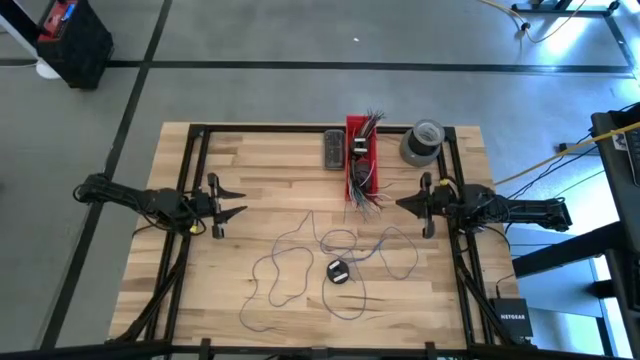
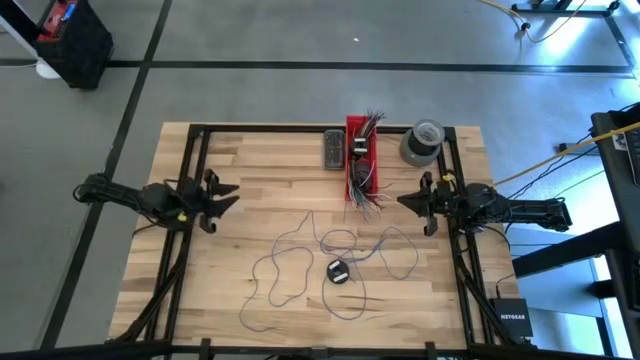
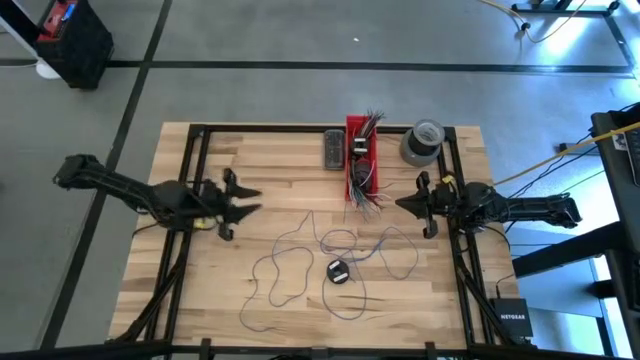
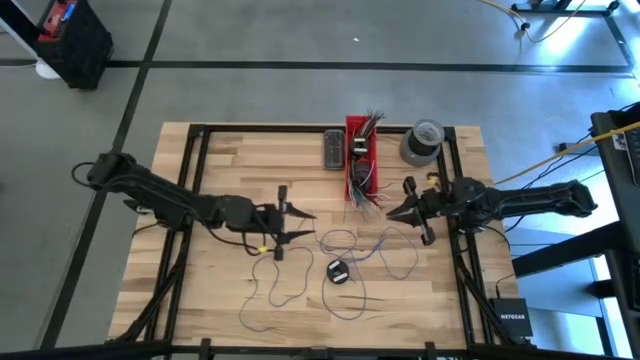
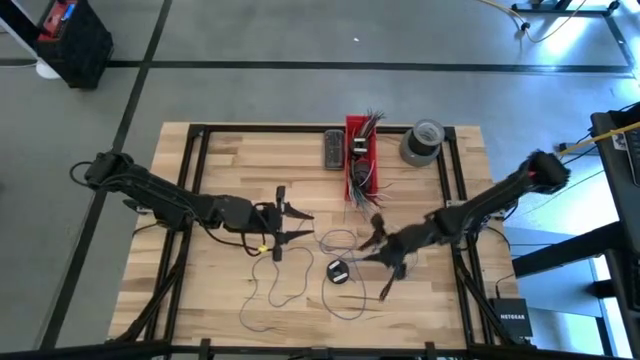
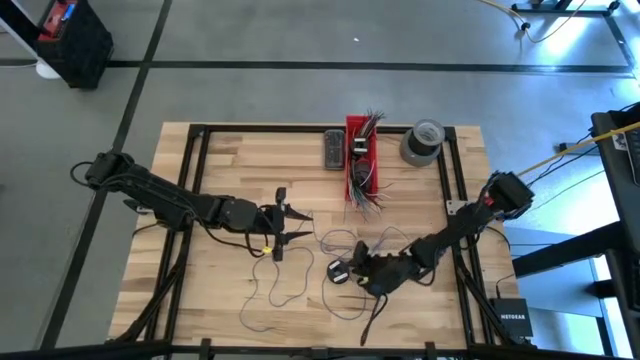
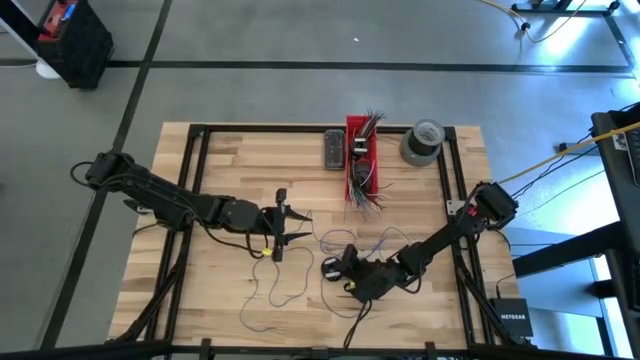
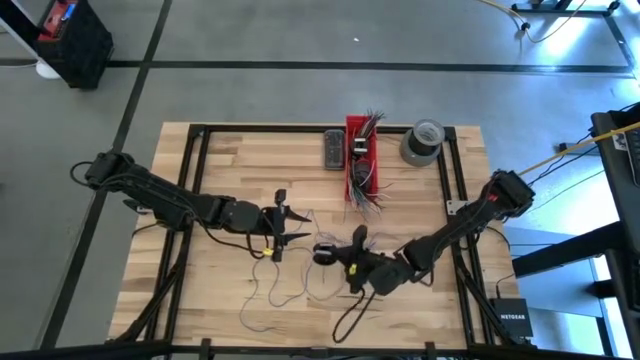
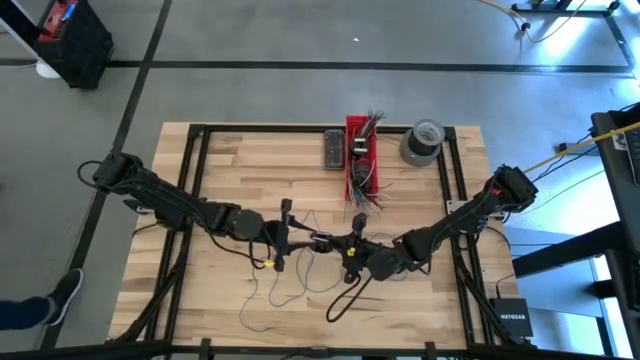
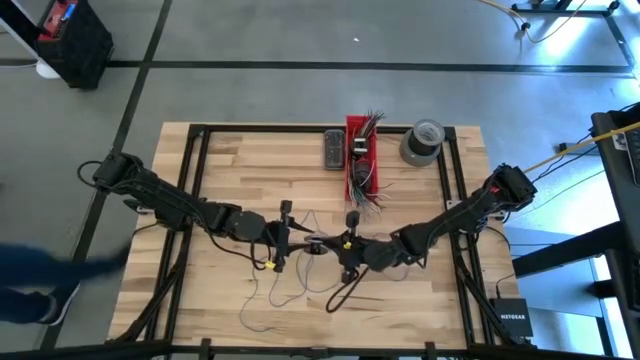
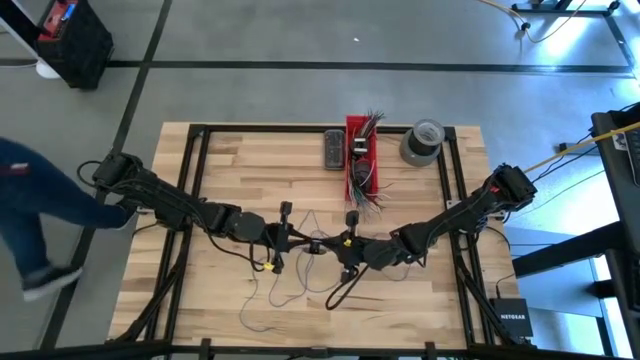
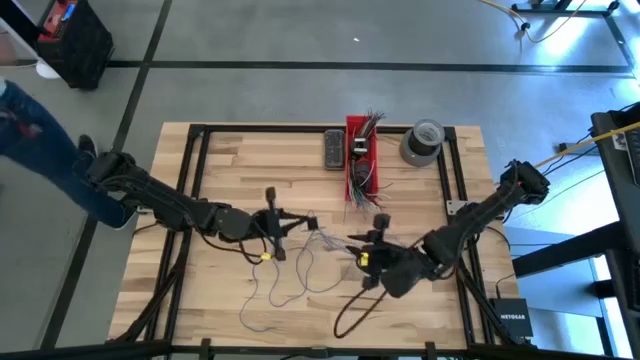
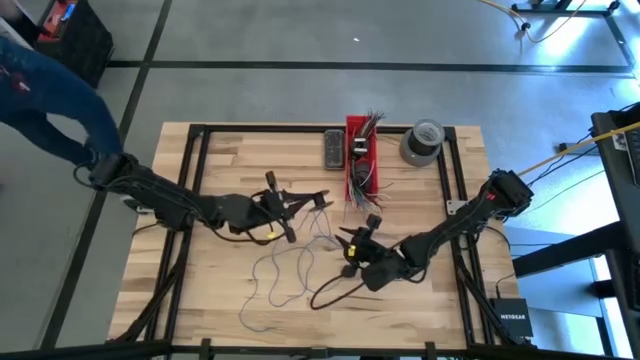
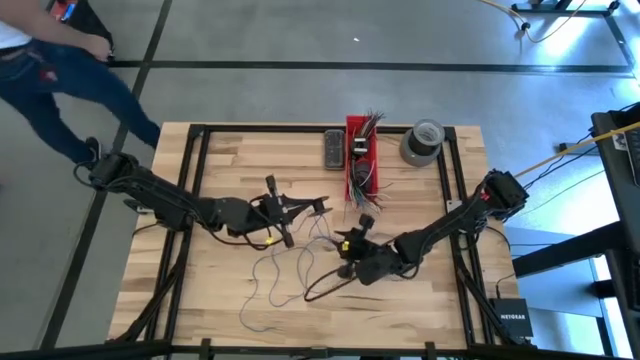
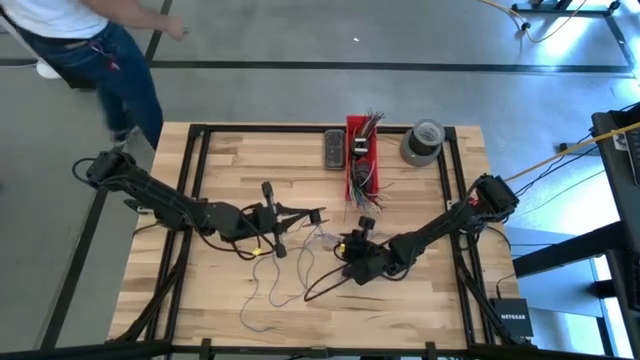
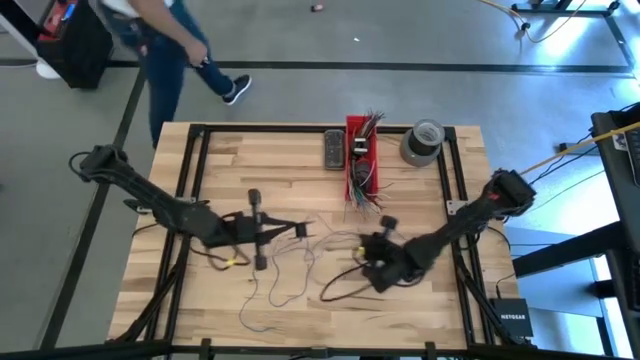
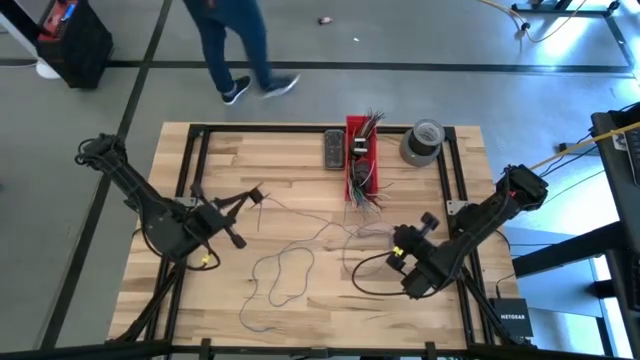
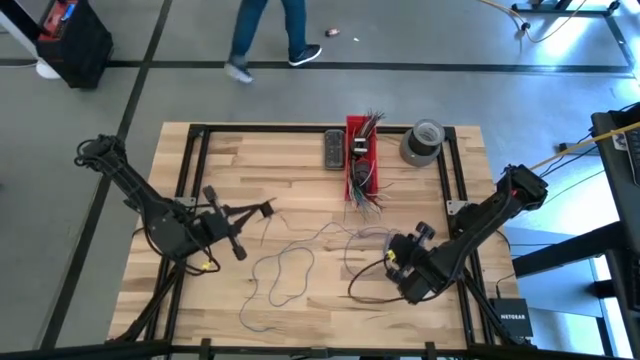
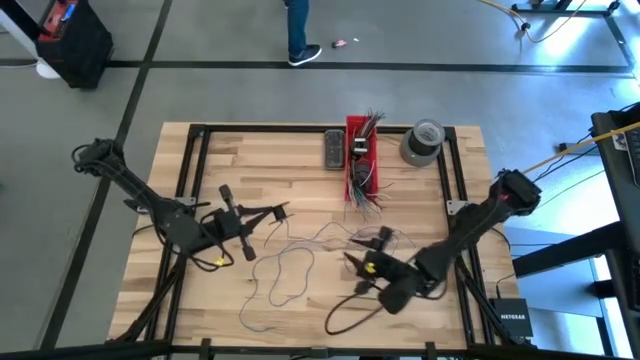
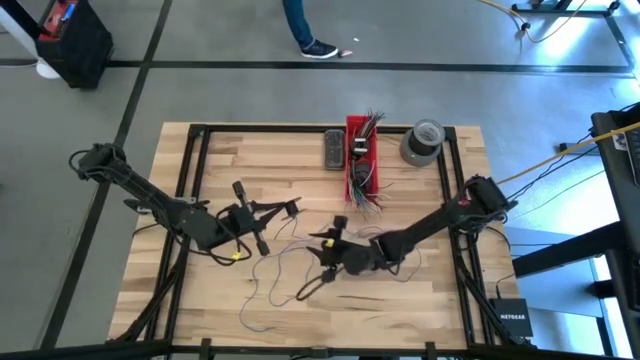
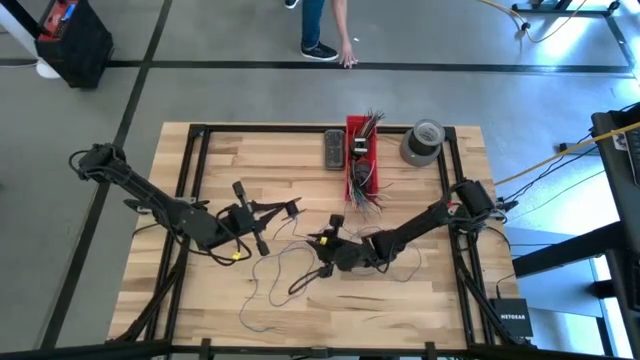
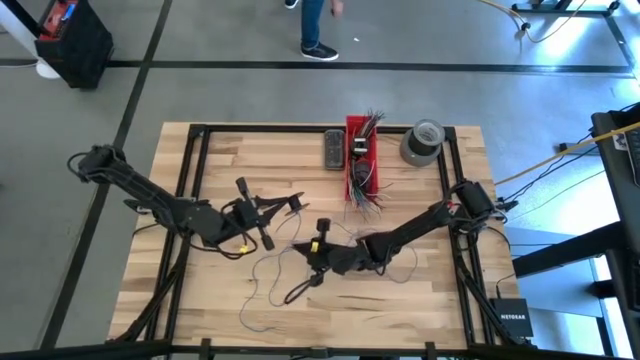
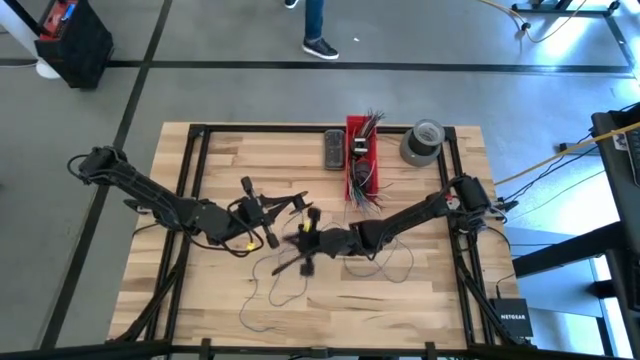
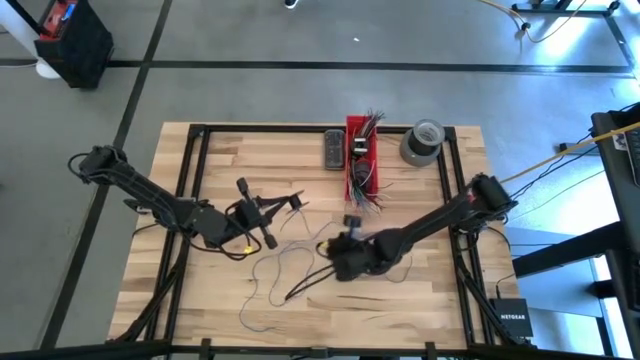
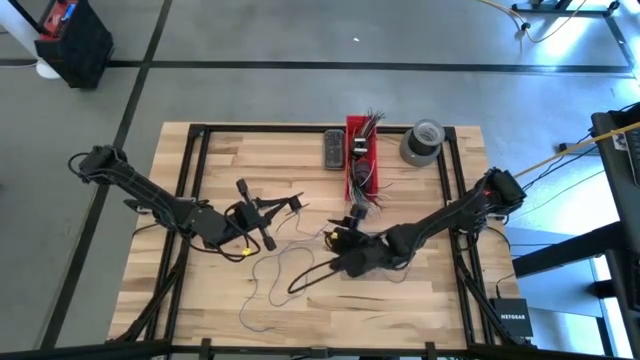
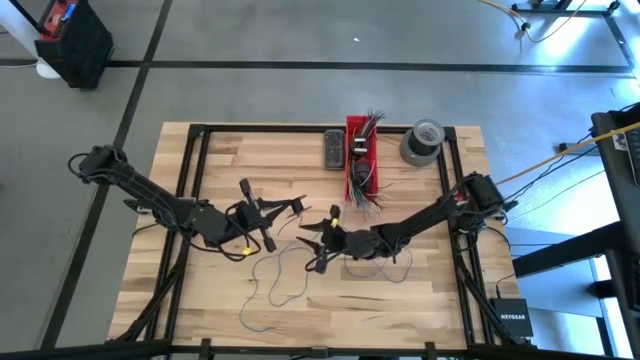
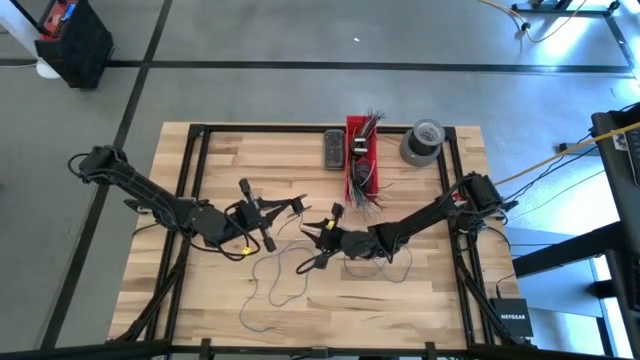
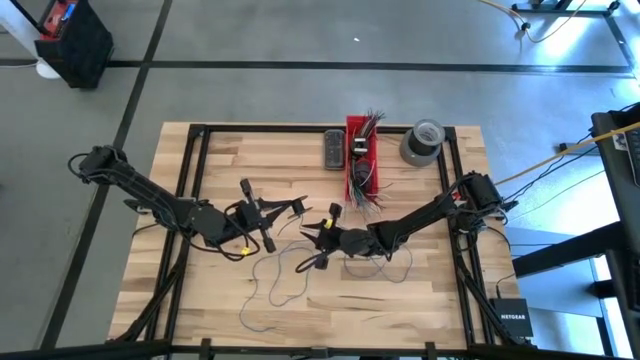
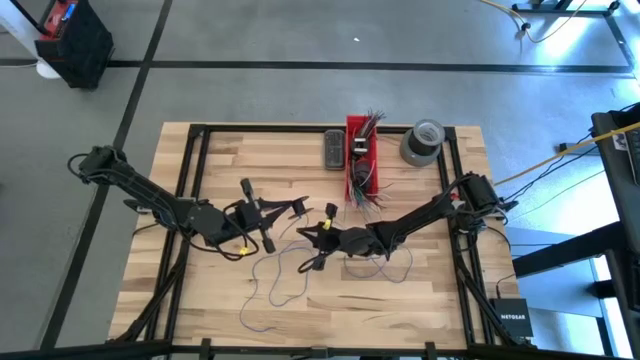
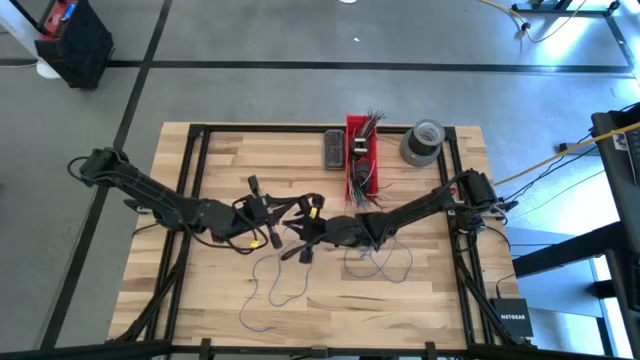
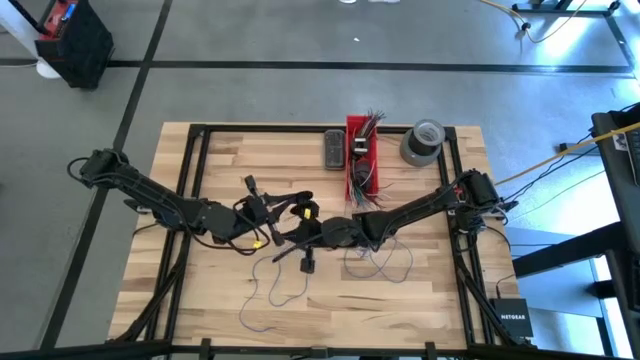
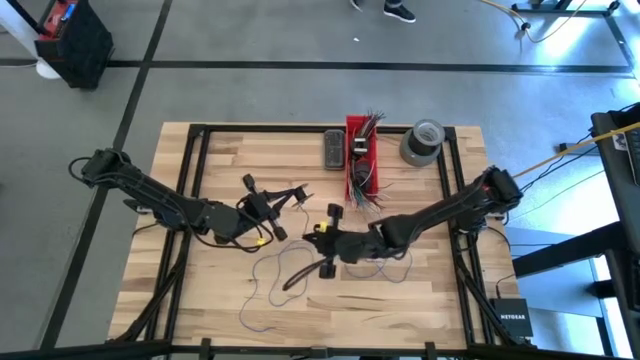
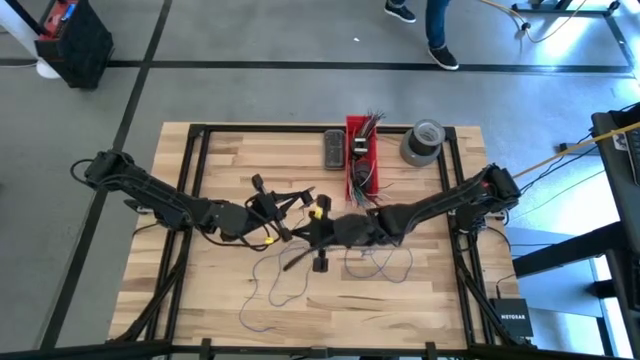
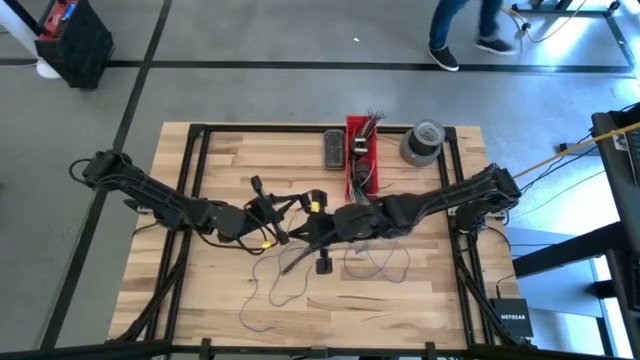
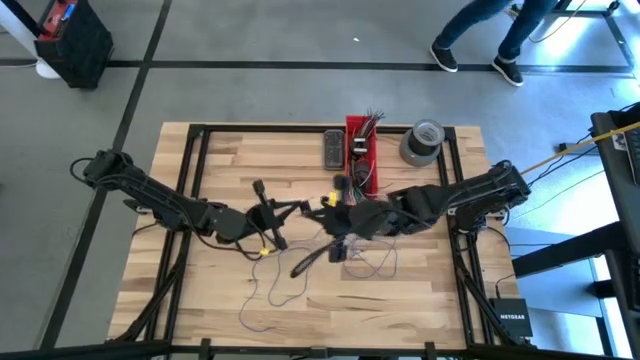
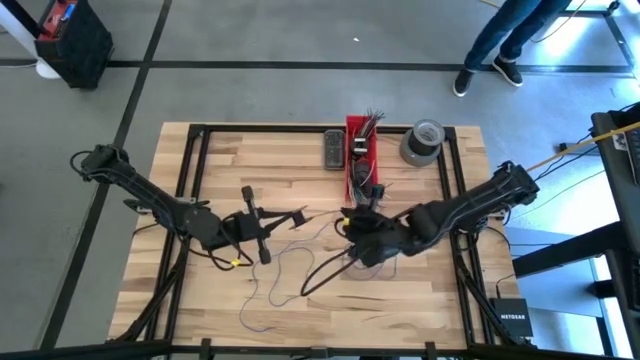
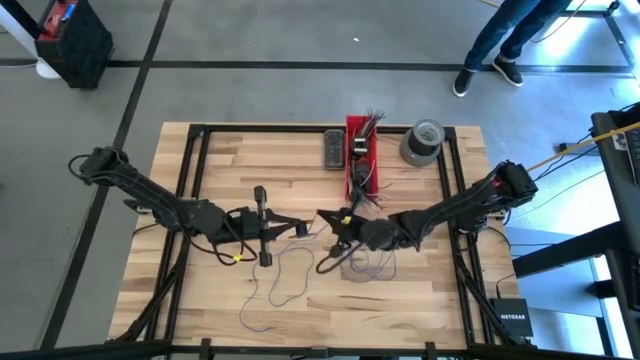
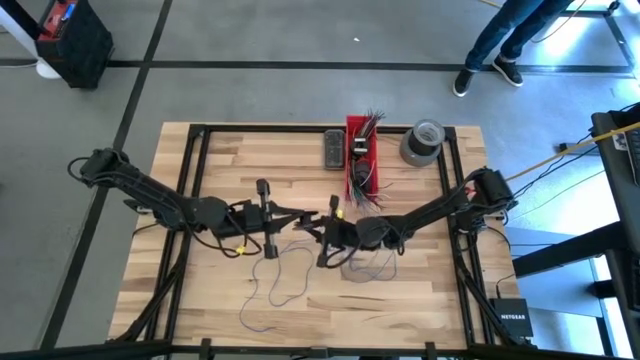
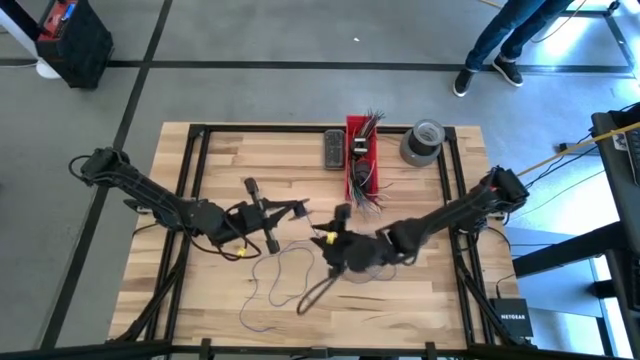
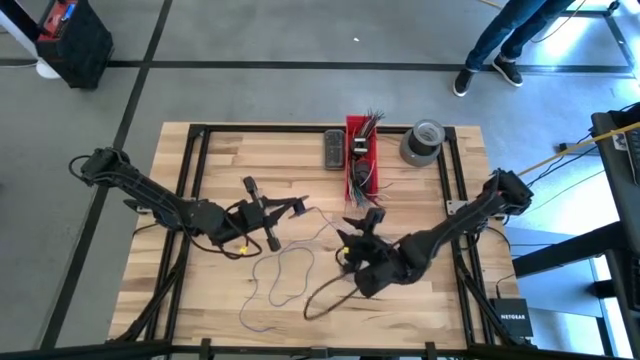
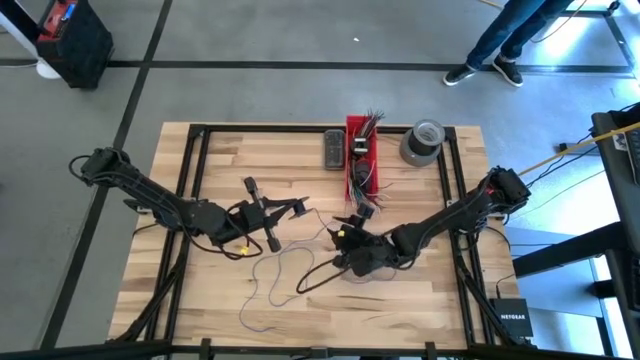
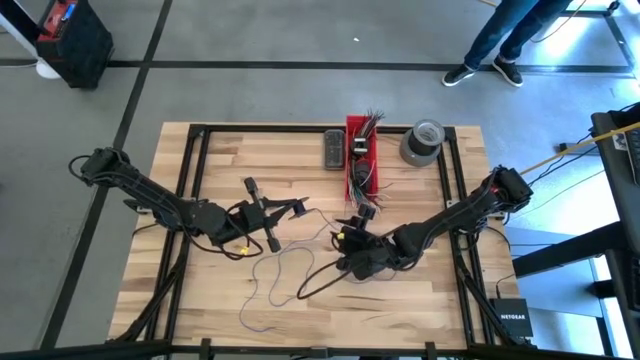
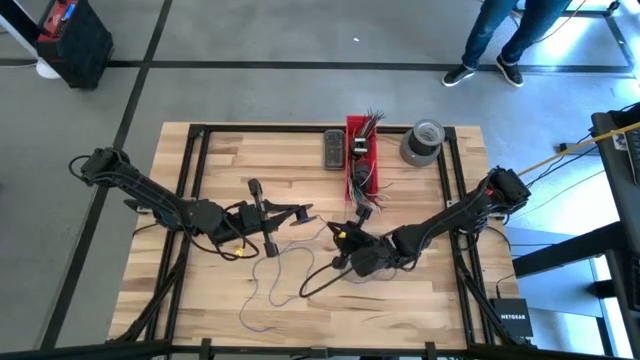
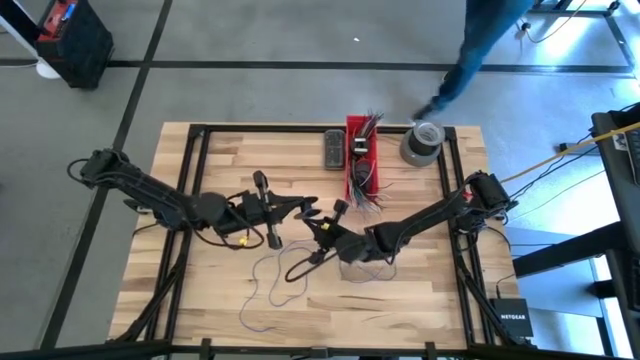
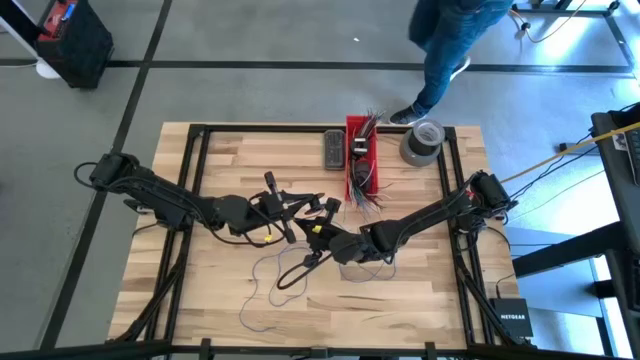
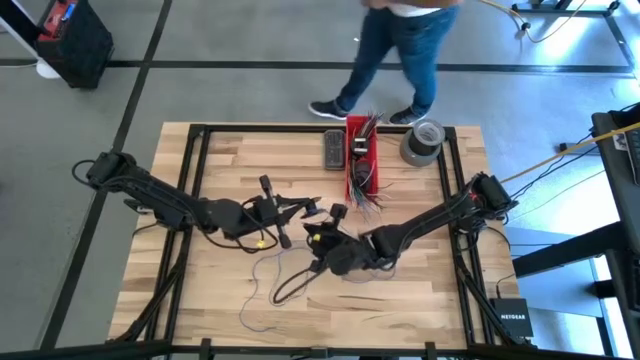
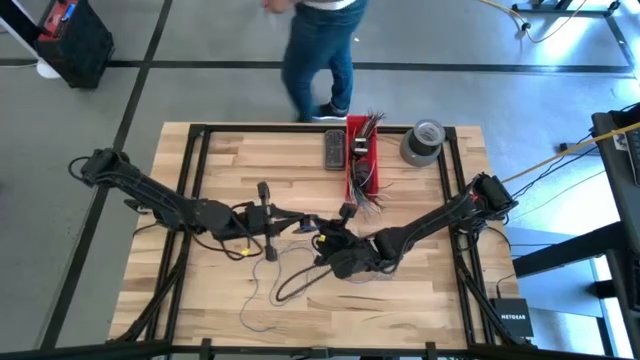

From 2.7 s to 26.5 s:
Task: Coil cords
Coil the blue wire into the black spool
